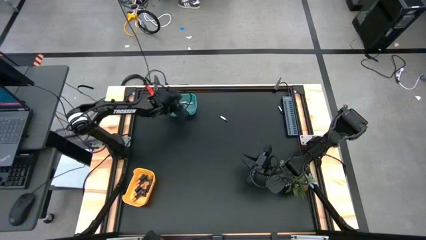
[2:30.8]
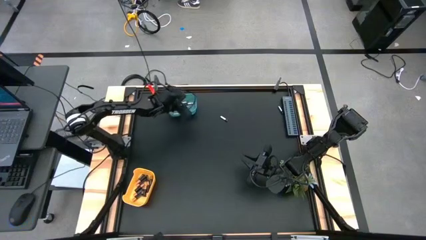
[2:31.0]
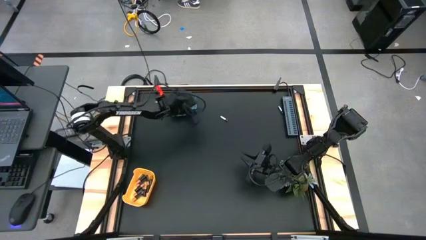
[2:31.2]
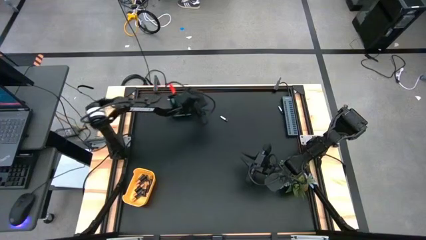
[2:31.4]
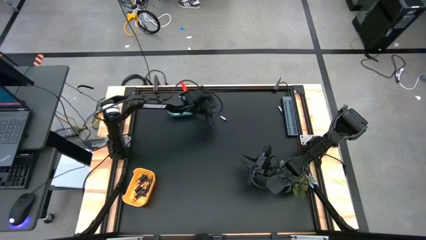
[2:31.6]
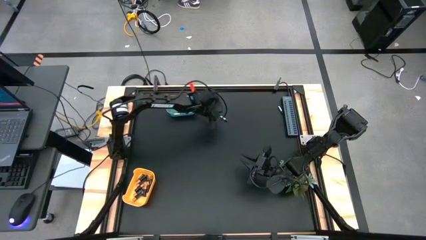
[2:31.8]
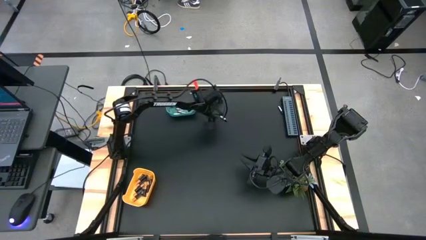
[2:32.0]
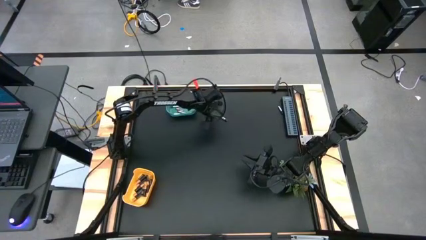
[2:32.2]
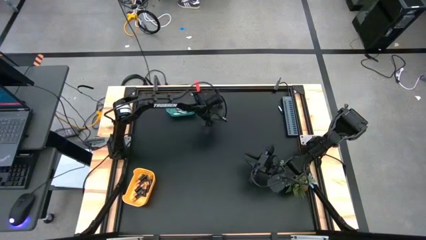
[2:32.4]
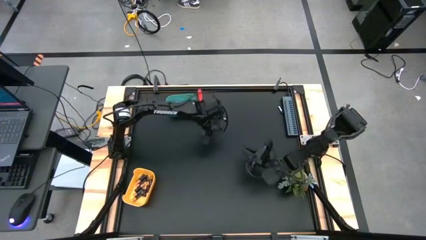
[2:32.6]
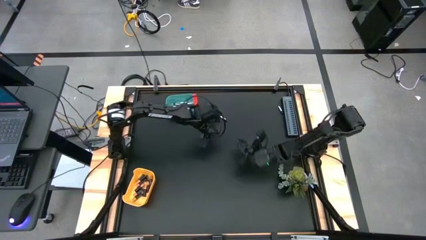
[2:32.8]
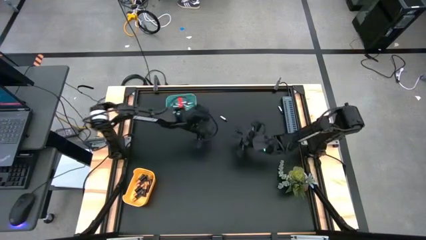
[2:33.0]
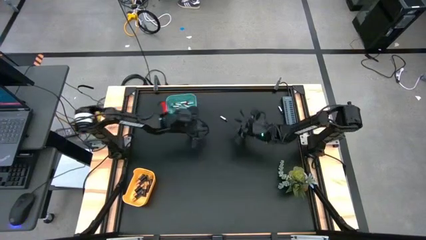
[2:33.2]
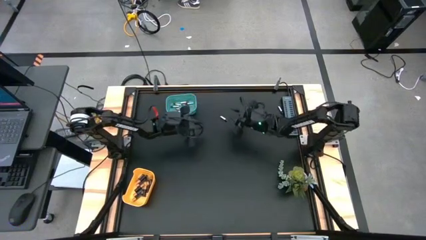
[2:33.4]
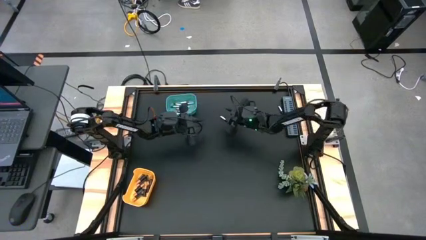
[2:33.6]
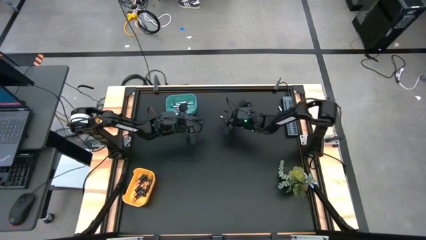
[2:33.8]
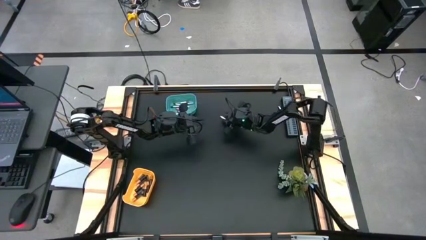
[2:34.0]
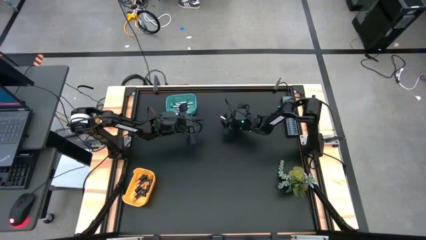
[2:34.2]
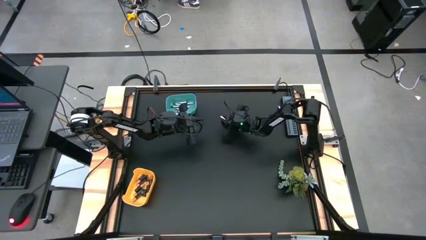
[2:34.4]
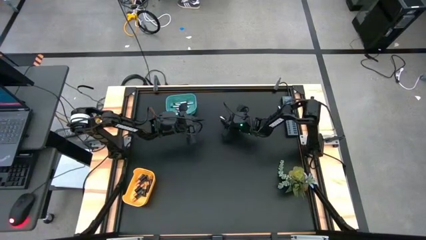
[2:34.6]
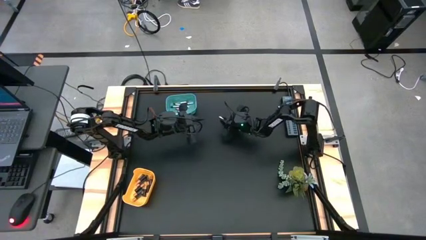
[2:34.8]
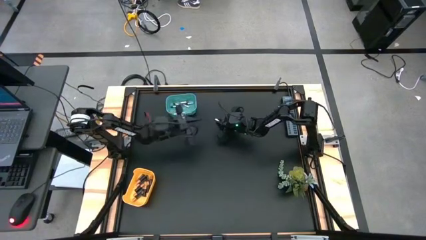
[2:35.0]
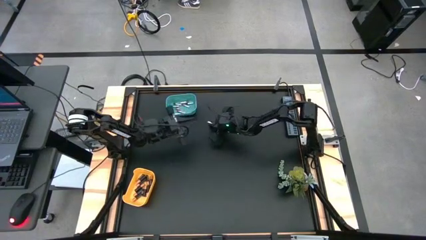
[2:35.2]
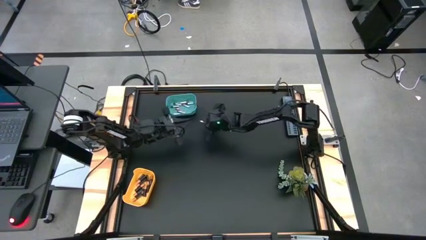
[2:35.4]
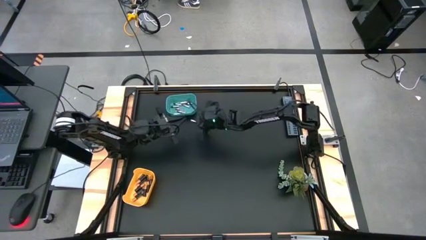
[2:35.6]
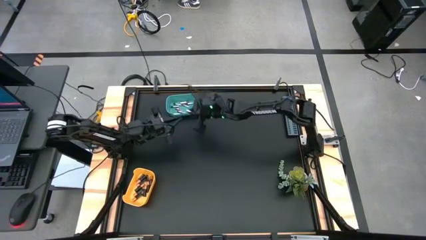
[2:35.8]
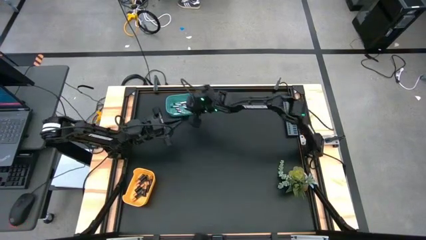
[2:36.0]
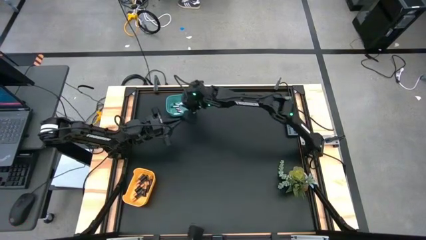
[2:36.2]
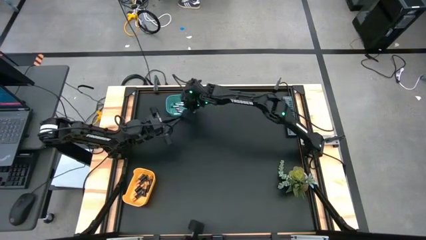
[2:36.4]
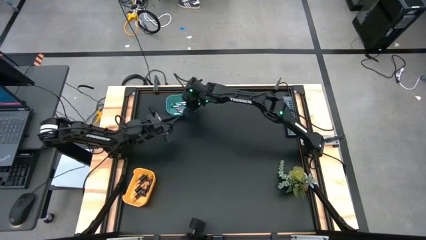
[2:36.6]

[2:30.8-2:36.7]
Task: Sort batteries
Put the silver battery into the green bin

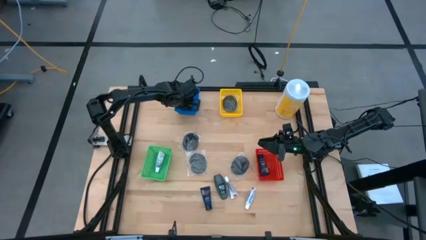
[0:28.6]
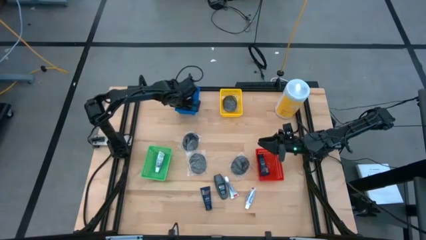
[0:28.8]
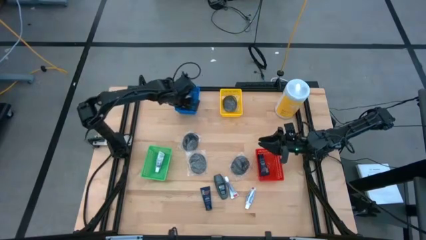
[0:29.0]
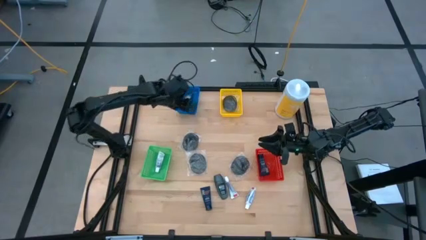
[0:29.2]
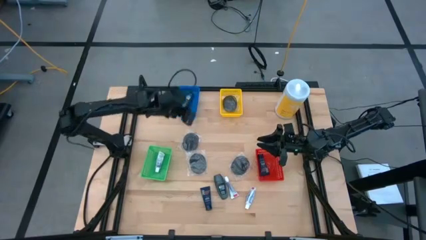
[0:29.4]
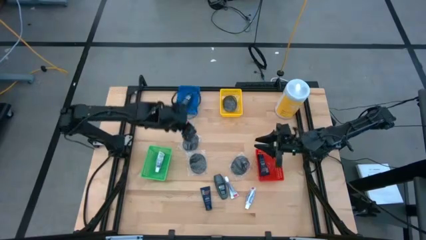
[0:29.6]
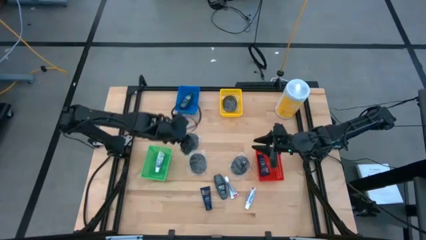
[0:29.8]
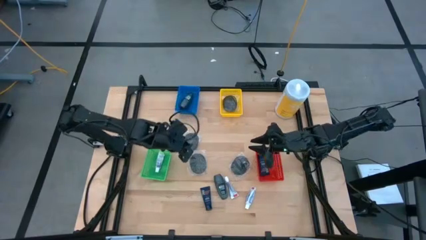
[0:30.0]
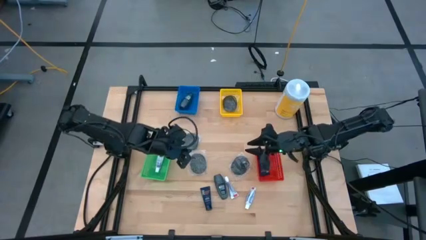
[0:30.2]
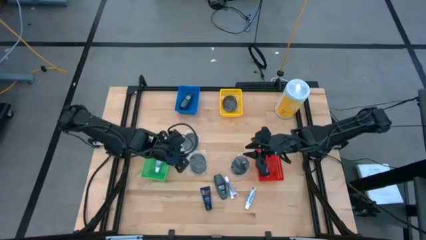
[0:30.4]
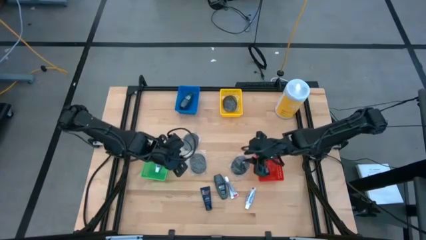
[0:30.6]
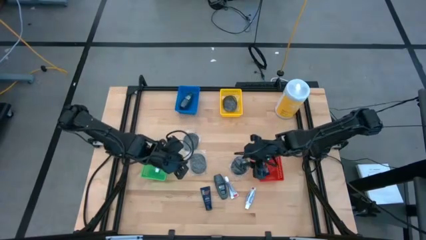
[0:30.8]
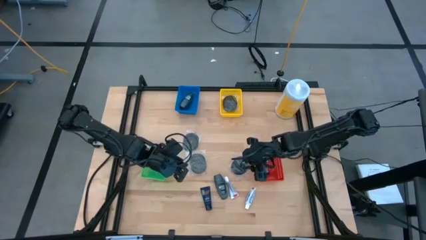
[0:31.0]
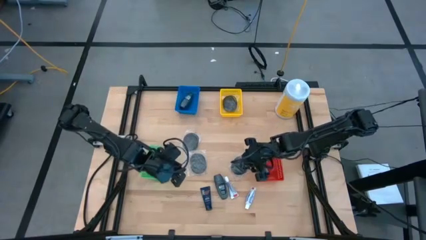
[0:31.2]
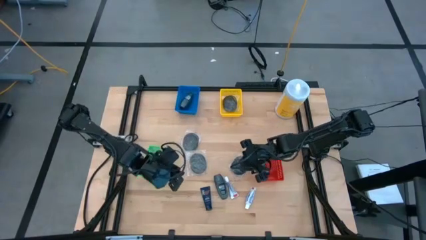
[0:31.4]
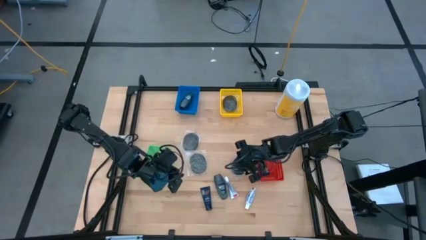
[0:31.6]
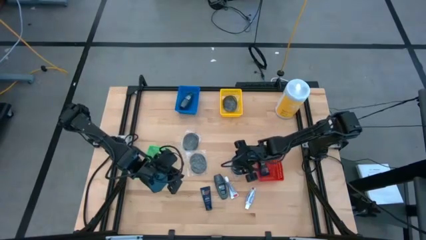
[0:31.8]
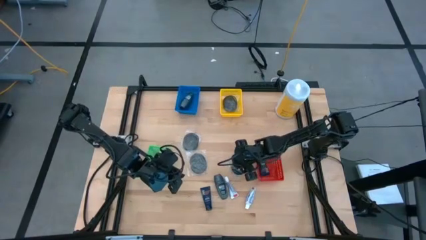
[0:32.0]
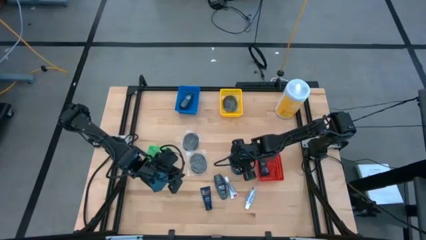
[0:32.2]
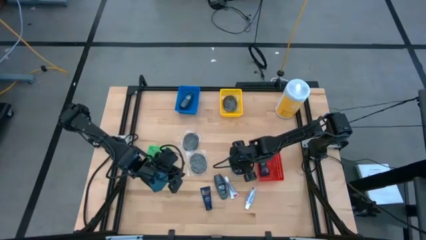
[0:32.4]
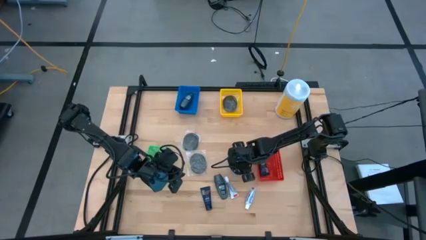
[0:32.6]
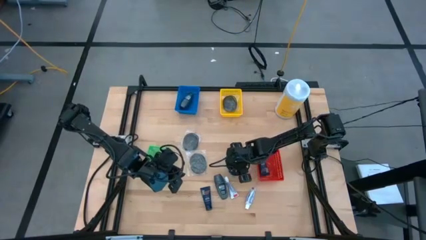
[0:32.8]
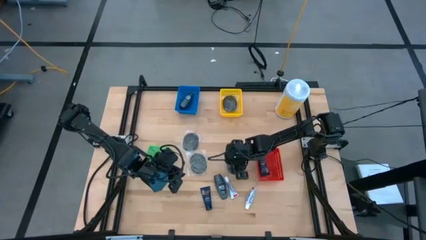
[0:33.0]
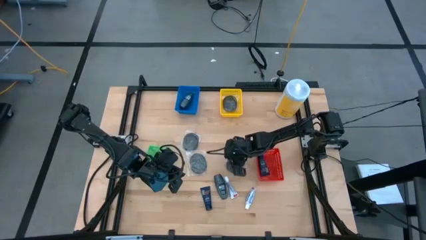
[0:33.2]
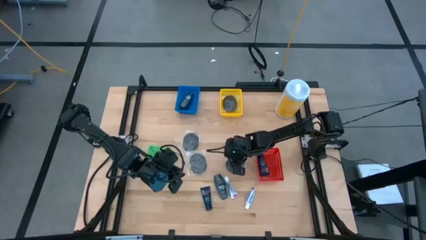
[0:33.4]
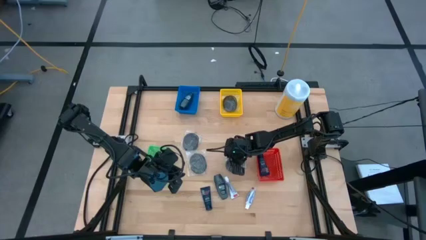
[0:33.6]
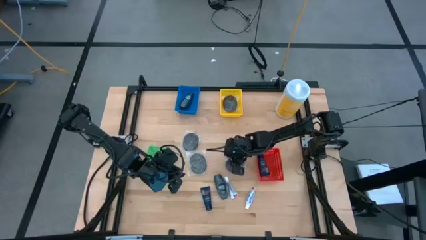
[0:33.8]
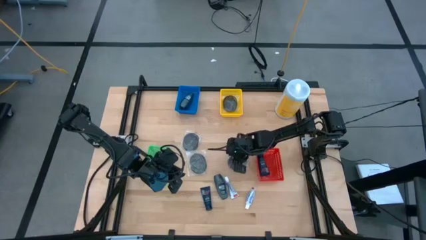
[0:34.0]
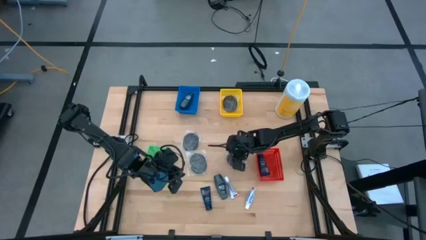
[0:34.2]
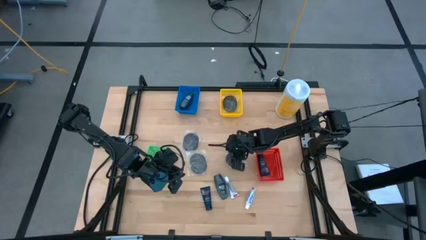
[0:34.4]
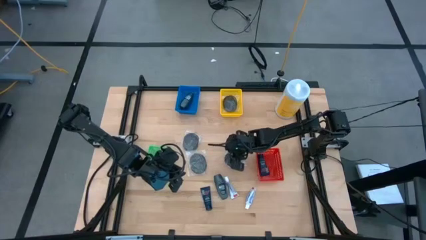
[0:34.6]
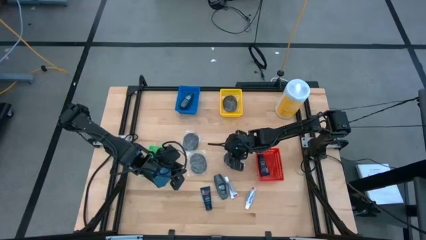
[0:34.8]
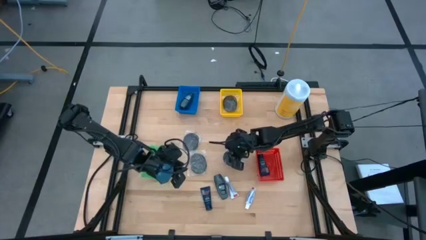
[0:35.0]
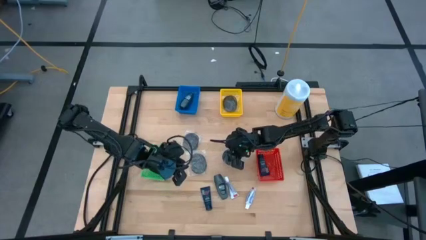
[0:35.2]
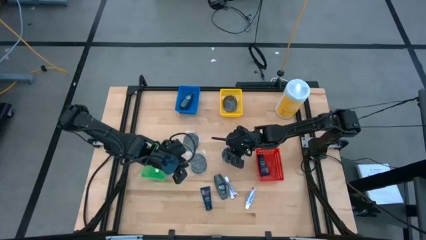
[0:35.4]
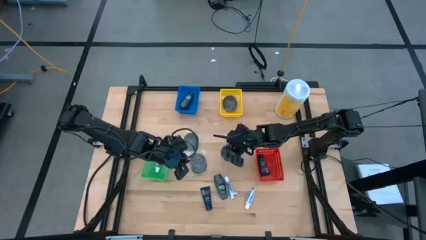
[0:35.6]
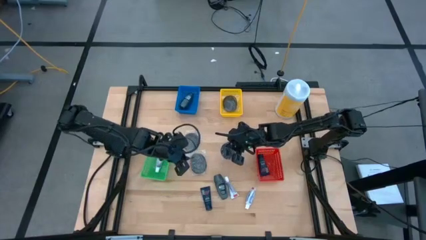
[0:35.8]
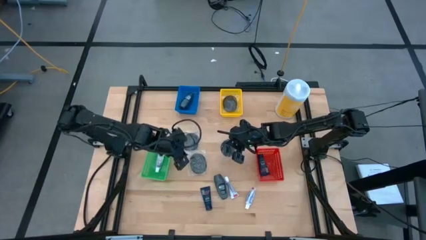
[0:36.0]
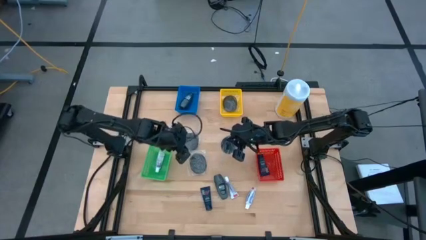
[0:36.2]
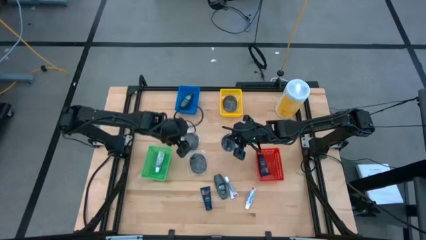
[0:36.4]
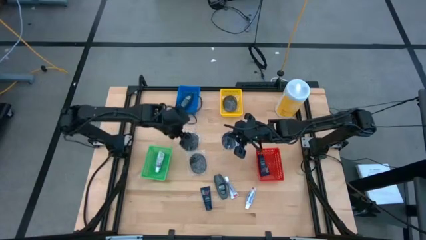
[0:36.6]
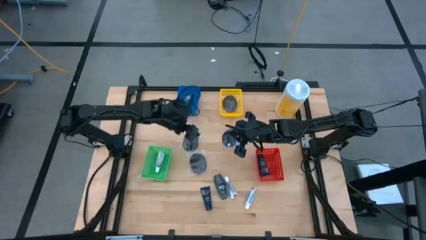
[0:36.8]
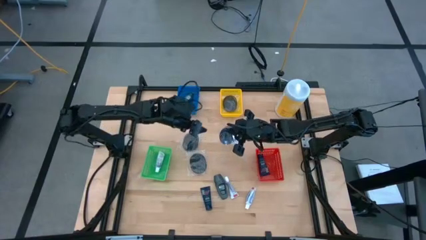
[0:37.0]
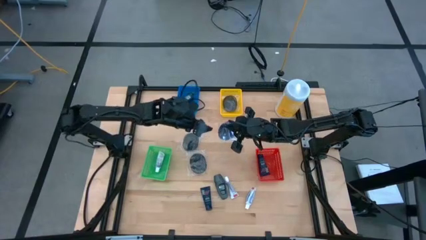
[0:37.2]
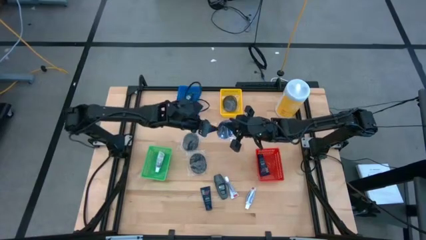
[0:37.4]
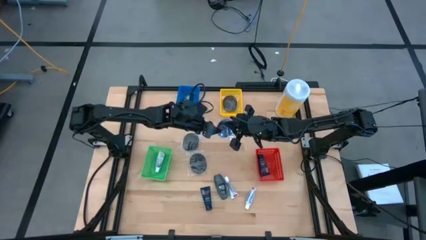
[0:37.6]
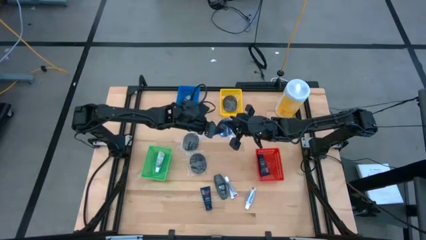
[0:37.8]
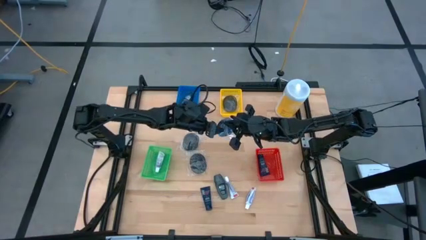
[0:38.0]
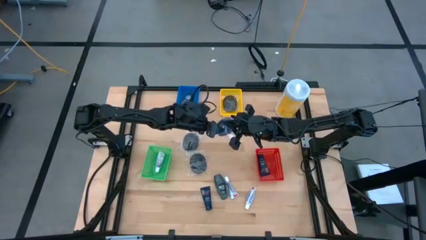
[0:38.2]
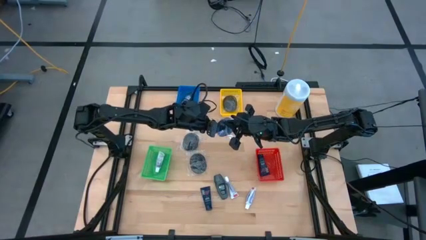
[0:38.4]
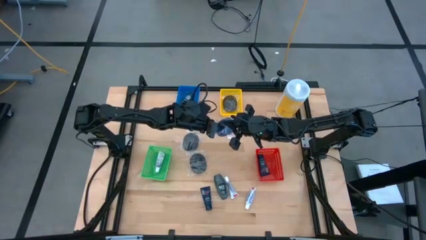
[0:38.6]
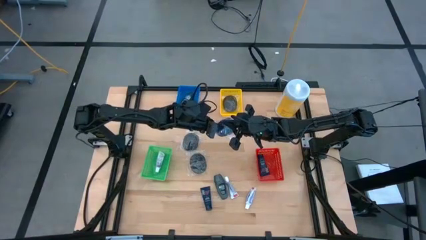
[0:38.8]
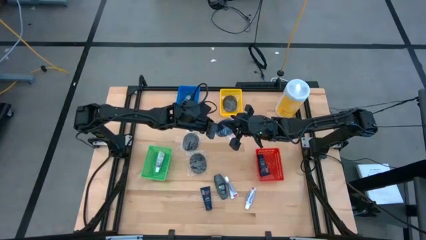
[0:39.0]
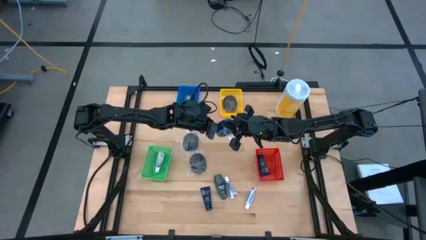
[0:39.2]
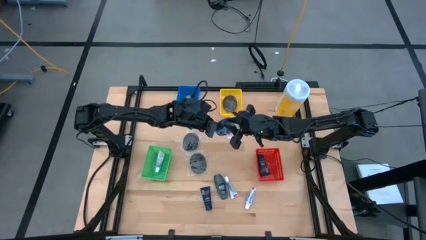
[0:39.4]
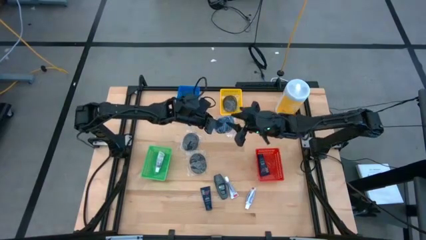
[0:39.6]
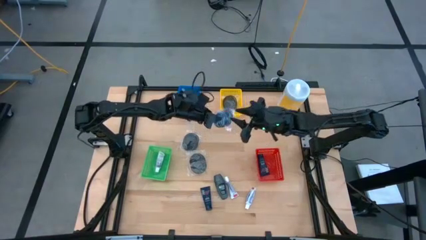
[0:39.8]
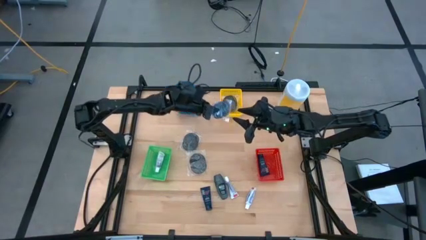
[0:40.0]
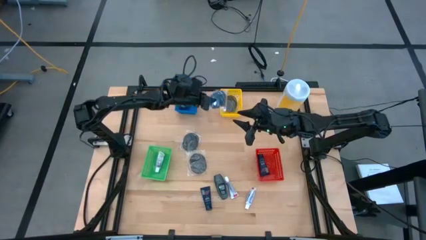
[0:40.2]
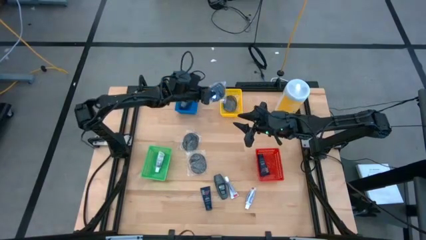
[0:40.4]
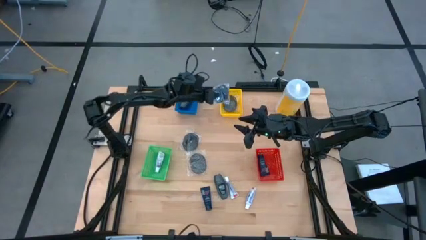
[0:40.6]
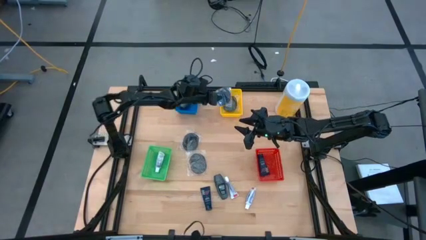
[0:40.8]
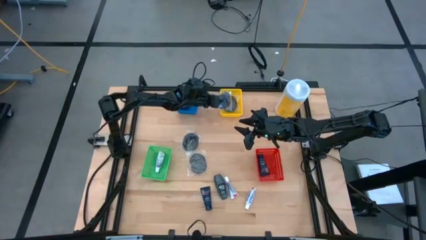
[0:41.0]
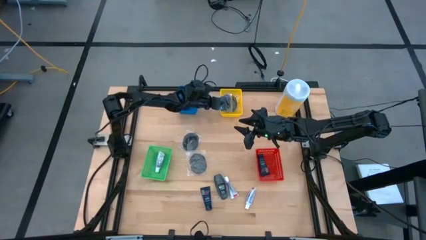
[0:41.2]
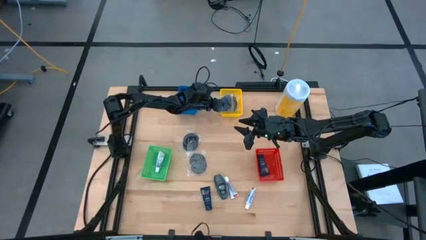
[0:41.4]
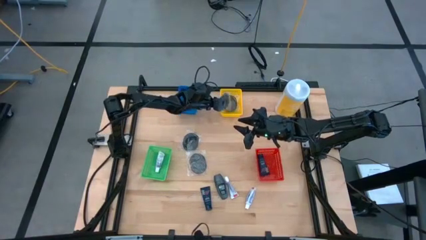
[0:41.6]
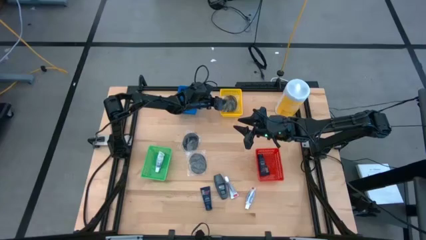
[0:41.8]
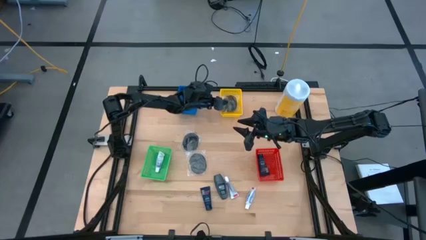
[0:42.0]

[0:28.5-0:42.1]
Task: Pick & Place Travel size toiletries
Put the black hairbrush into the yellow bin
